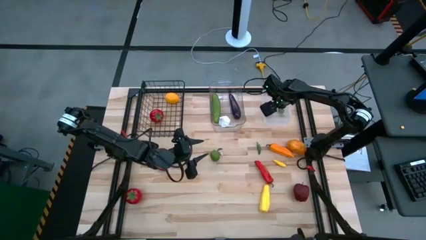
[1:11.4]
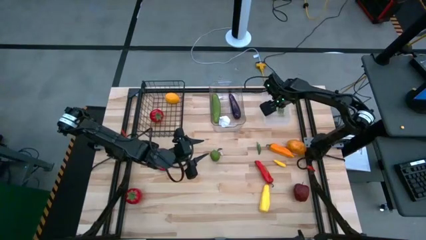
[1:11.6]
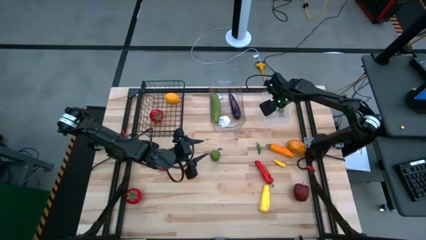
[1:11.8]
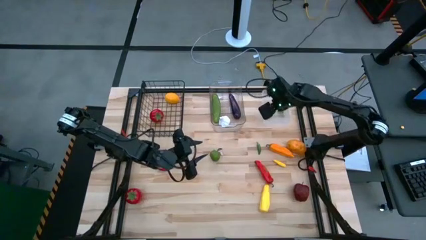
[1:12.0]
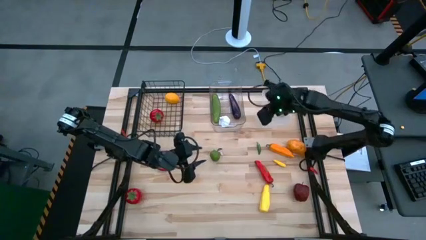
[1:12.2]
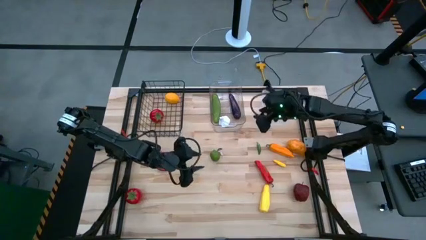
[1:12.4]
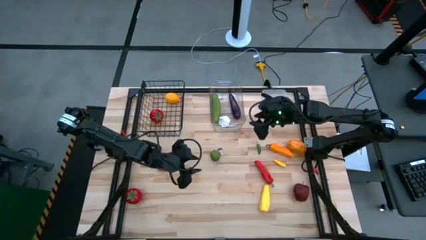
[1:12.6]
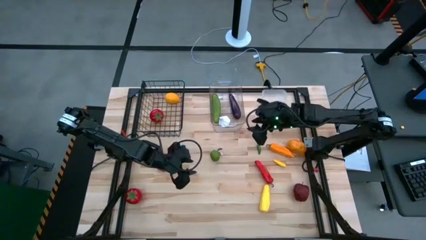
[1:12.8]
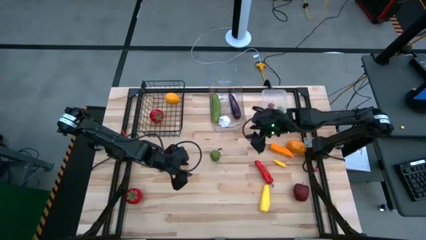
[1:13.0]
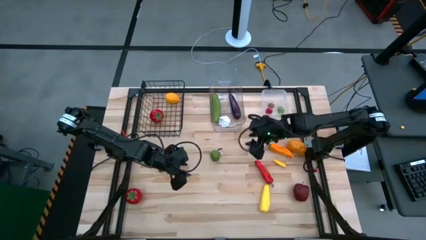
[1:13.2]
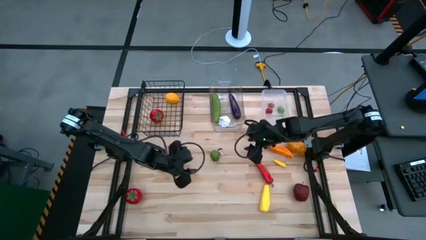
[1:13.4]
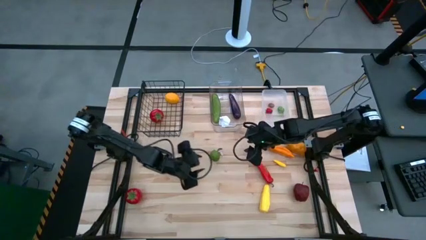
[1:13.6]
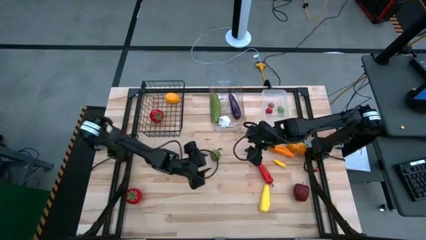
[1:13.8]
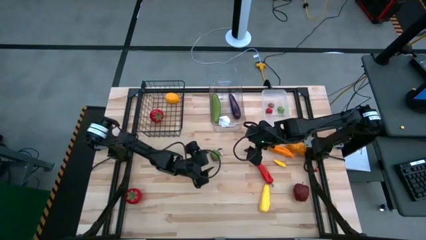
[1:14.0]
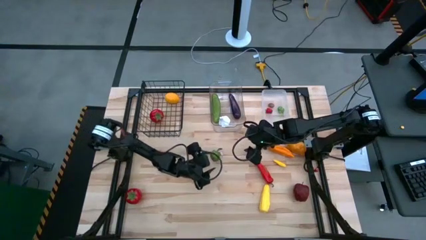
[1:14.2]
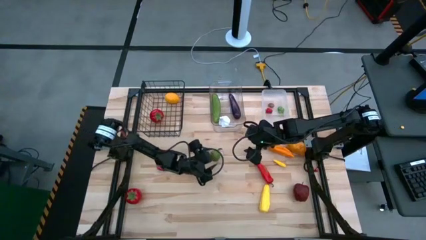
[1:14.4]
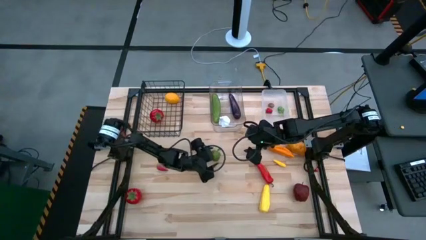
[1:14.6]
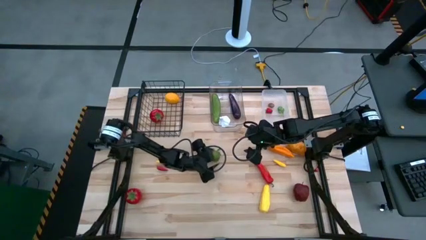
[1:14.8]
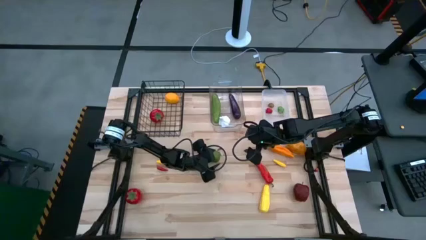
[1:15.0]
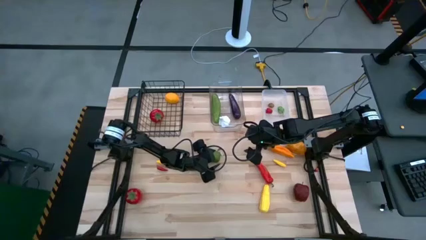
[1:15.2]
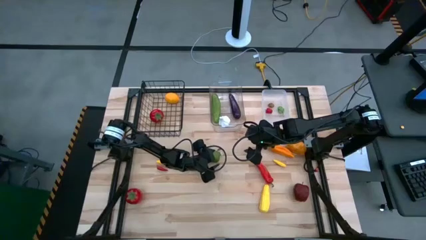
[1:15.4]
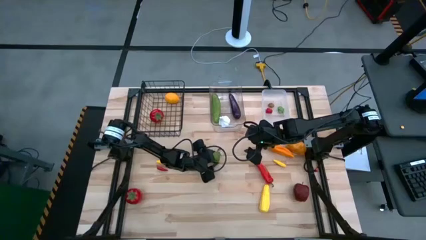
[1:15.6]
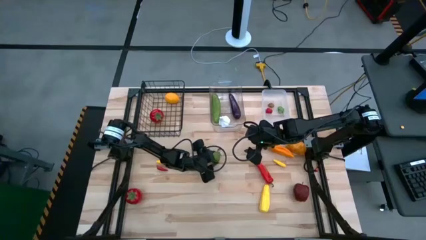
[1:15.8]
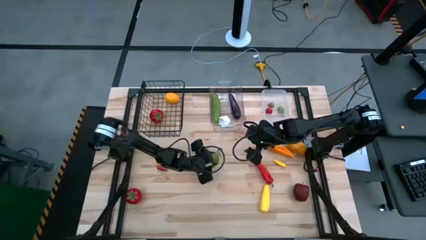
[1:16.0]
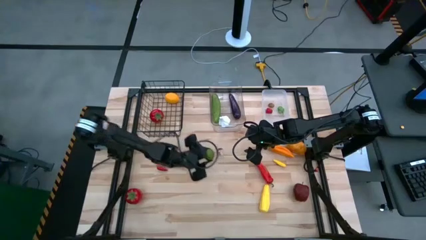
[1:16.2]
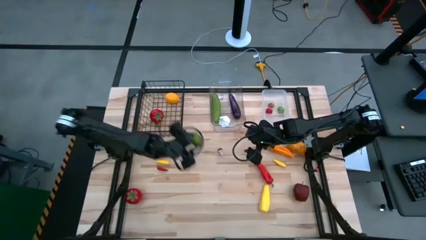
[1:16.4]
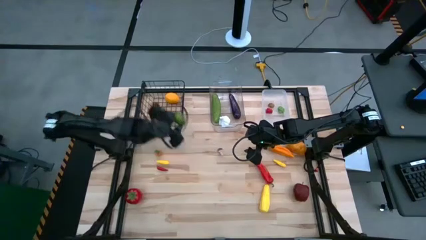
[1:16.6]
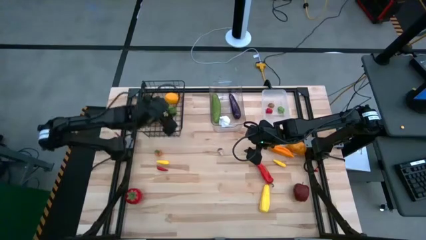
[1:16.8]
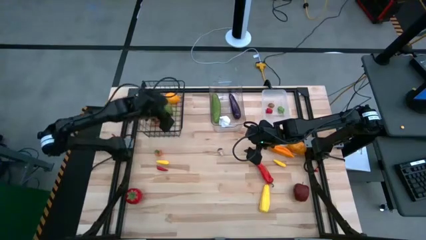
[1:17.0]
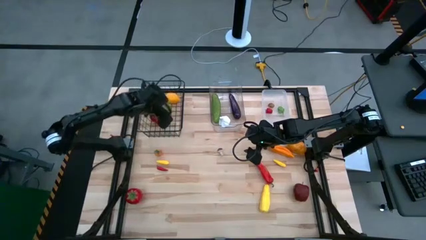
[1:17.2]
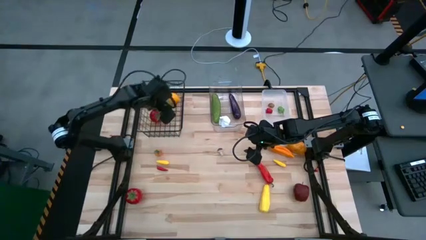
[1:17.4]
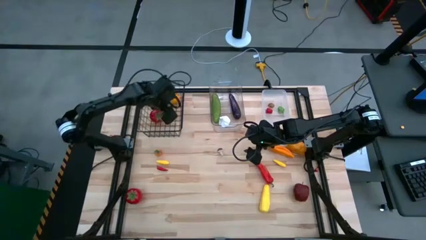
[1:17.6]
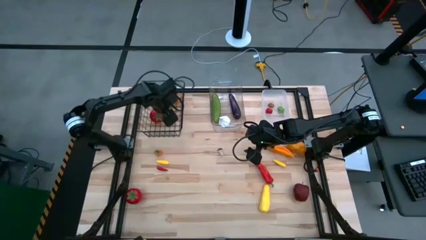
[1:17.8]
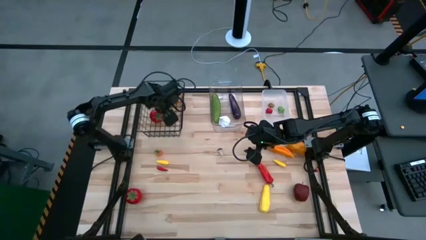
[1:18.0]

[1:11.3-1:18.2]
Task: Sort produce into baskets
Put the green lime into the black wire basket

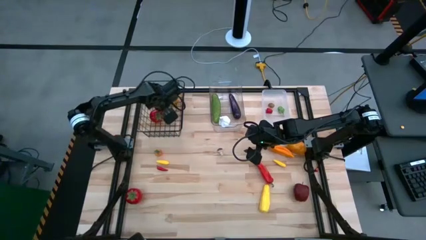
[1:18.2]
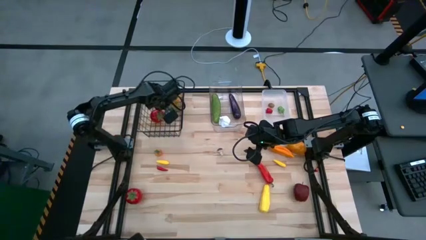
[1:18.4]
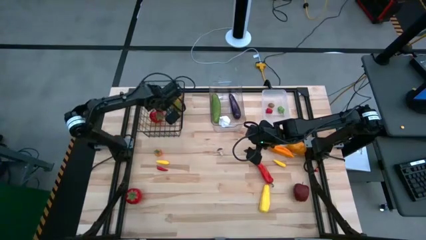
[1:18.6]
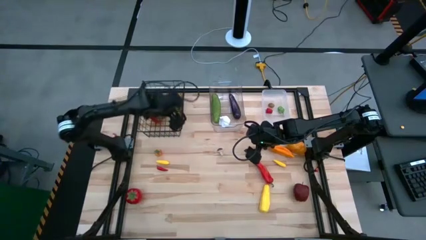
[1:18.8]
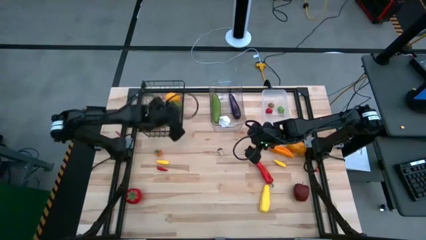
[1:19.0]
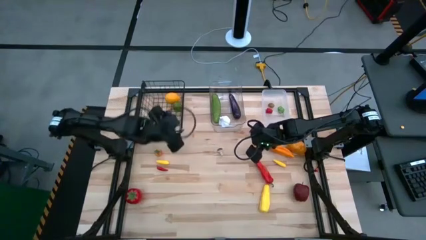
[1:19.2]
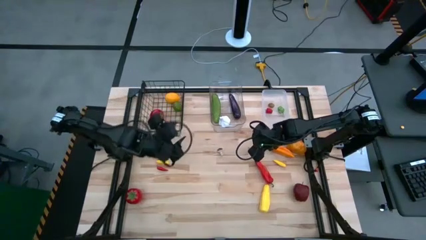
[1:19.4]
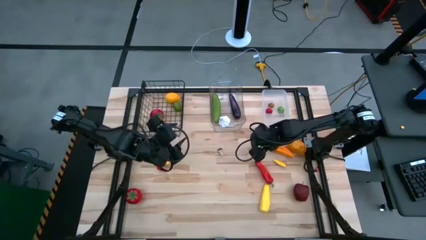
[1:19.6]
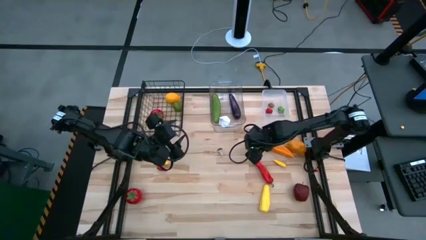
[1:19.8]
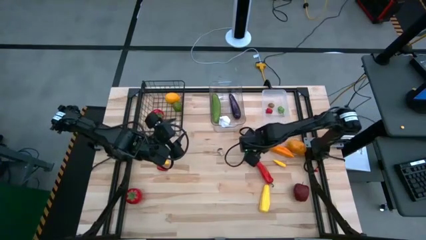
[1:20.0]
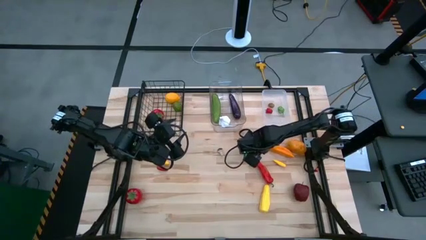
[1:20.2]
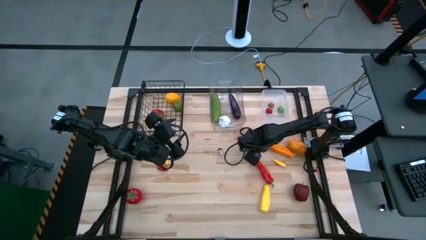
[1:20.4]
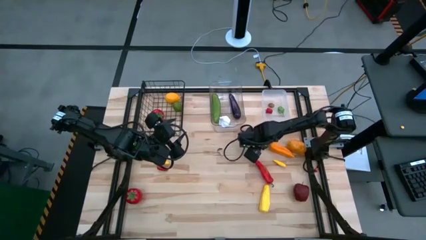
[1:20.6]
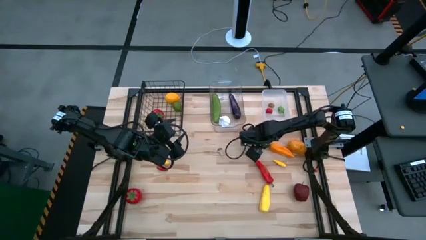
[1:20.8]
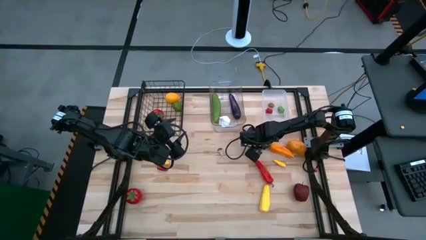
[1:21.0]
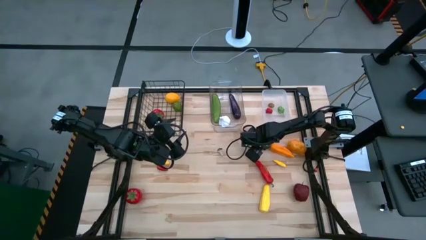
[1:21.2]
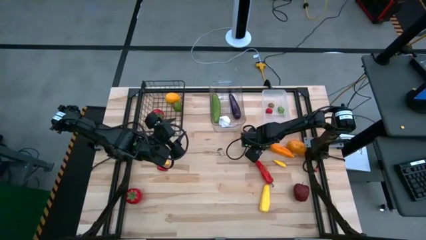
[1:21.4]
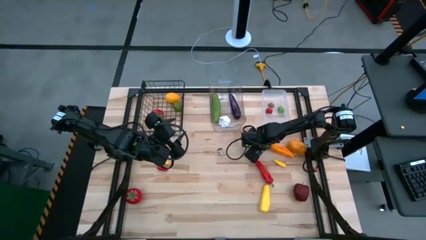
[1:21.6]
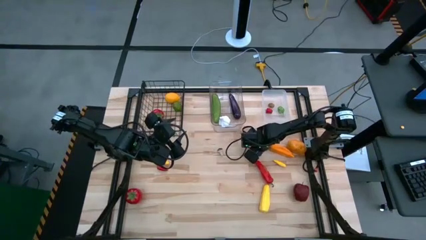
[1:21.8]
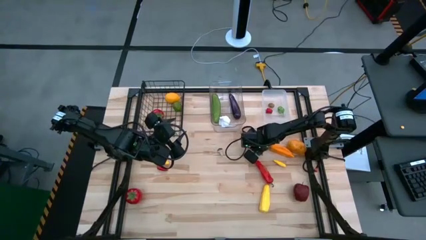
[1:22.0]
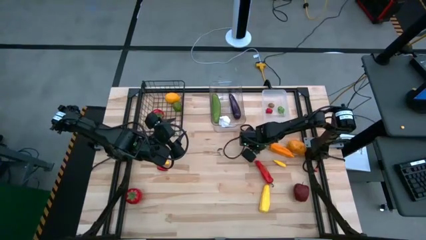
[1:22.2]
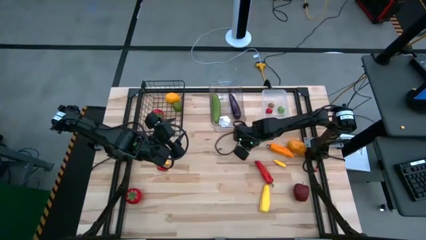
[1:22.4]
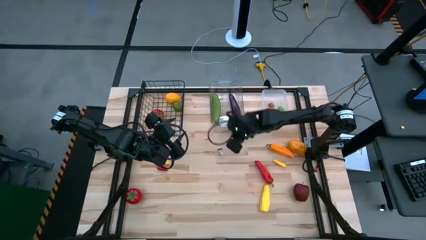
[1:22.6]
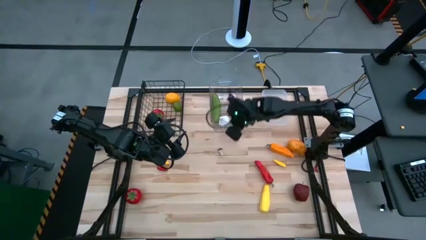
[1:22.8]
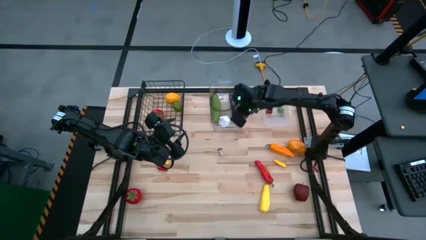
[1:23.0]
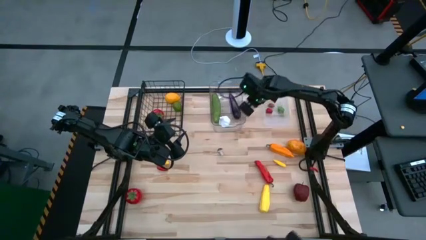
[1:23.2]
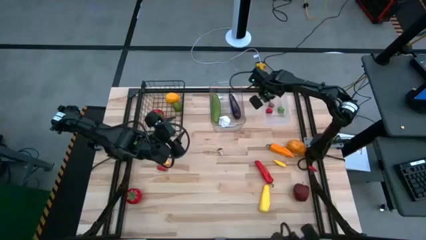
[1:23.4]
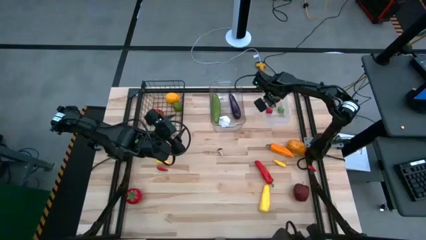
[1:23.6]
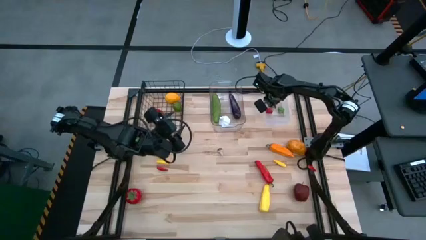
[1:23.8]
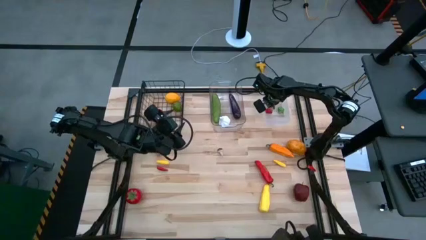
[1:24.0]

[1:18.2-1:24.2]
Put the green chili pepper into the right transparent bin

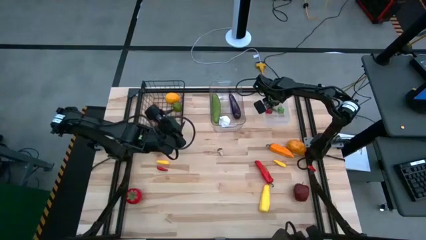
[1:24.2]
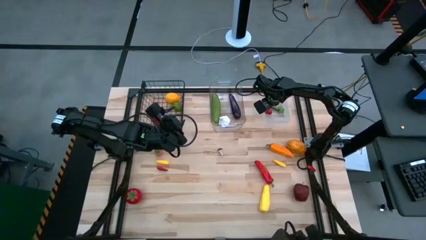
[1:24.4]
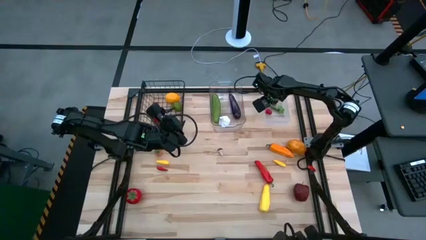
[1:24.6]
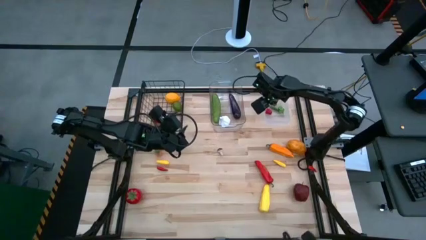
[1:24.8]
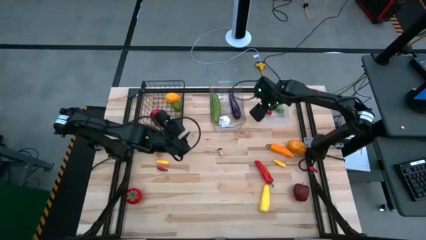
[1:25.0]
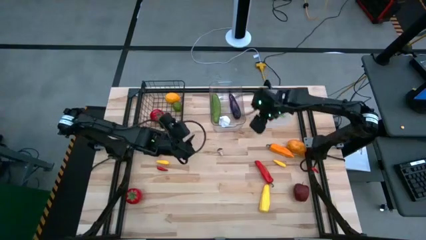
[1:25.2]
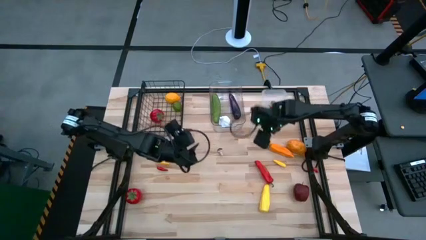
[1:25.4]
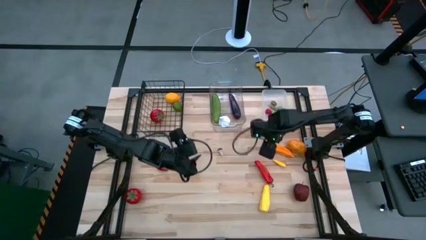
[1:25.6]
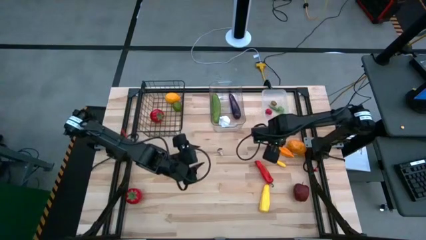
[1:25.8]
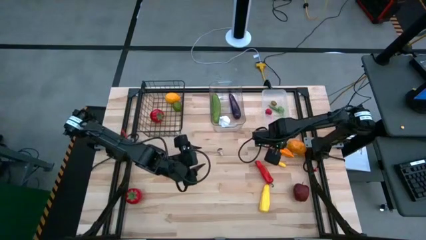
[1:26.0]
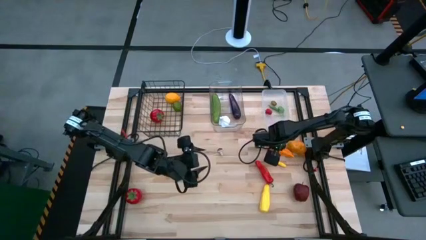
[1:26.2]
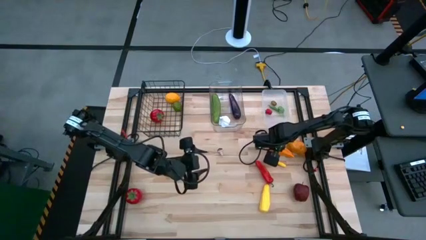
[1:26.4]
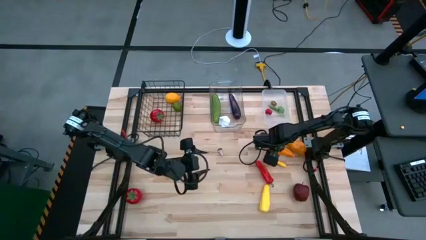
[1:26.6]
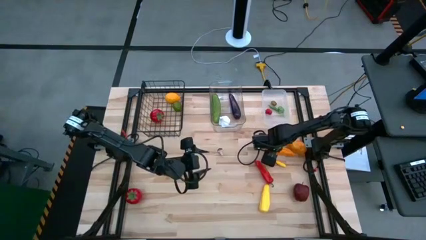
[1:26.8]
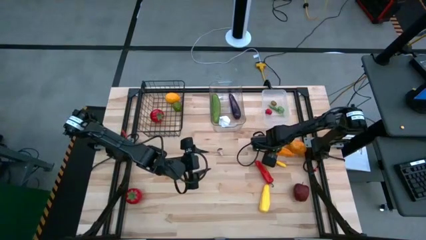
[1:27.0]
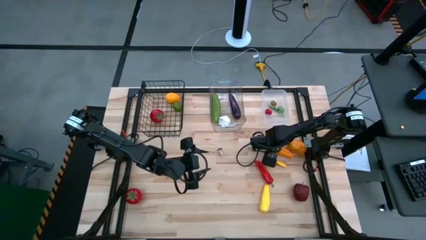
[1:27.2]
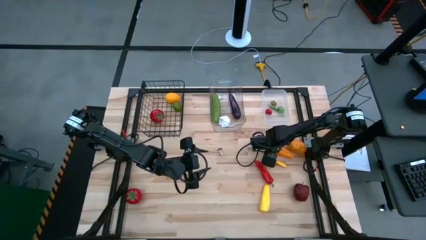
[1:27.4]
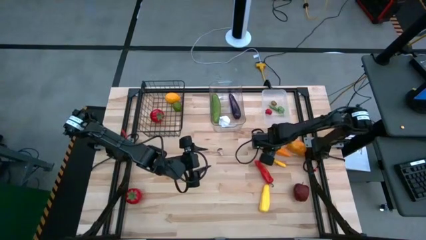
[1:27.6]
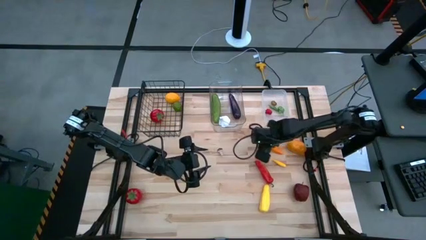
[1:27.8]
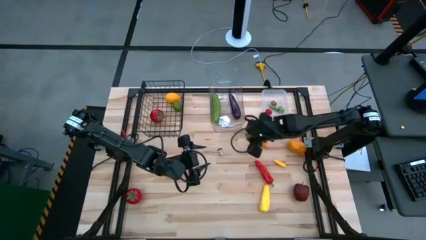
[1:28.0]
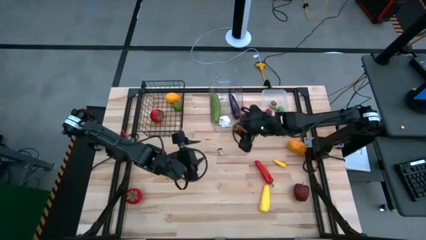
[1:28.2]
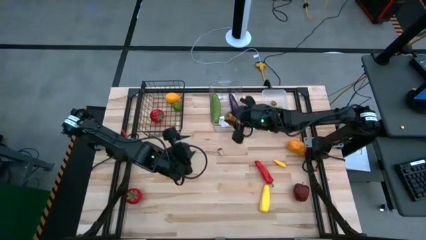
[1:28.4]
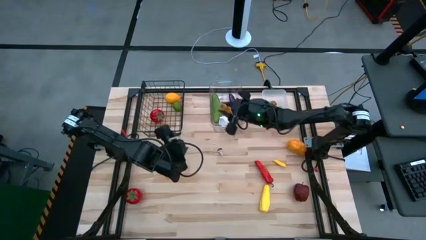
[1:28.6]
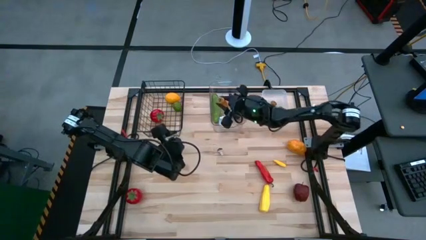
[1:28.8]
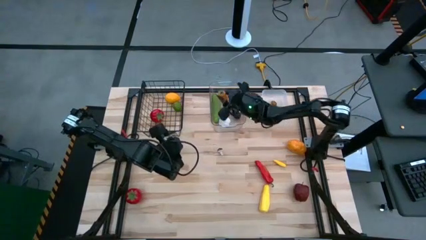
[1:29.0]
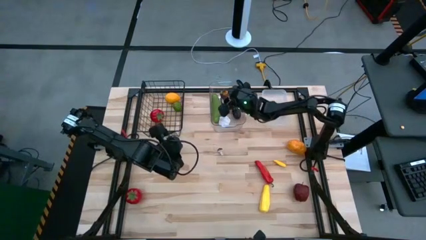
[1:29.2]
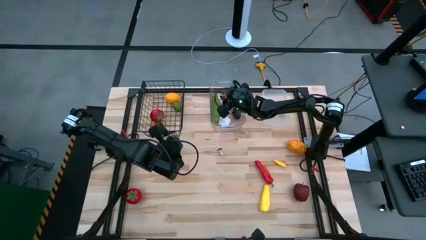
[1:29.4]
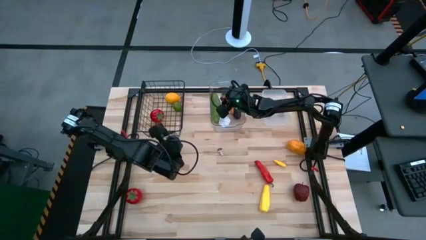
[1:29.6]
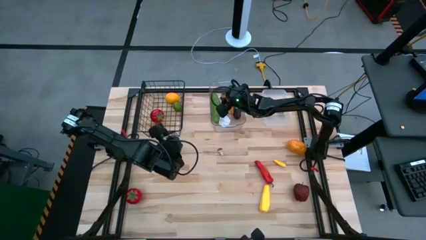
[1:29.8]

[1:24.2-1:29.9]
Put the orange chili pepper into the left transparent bin
